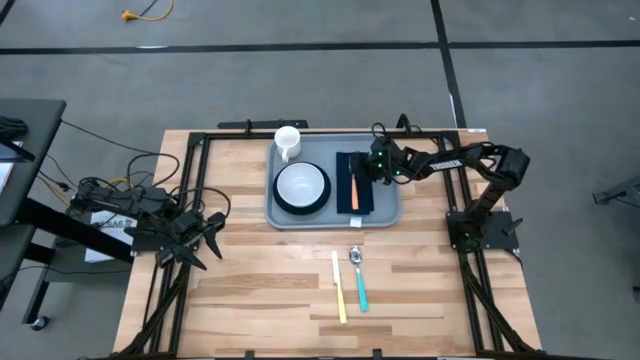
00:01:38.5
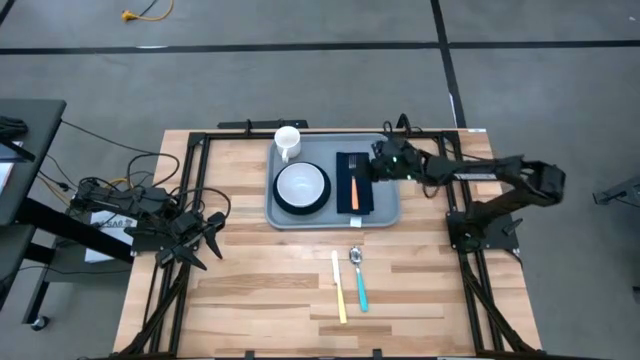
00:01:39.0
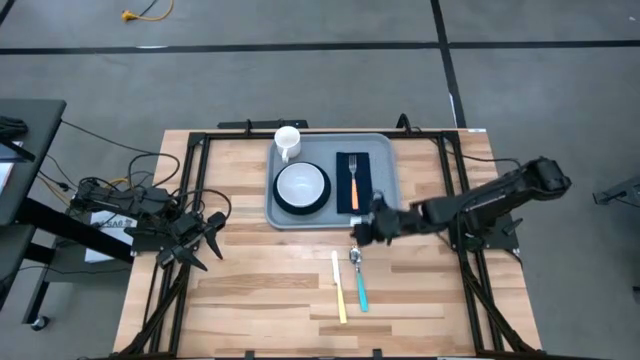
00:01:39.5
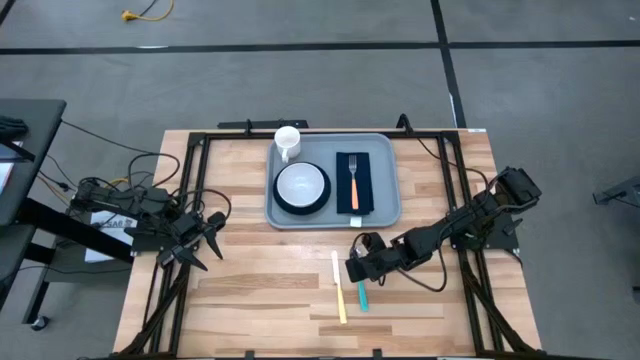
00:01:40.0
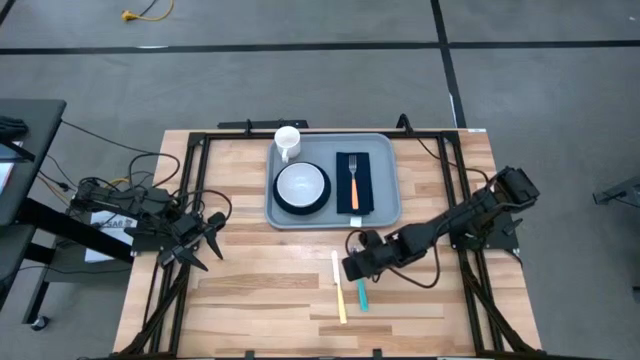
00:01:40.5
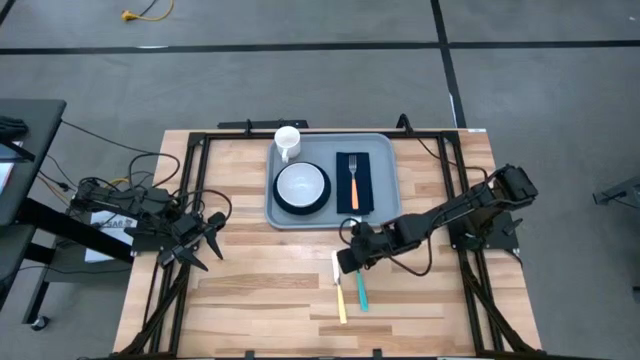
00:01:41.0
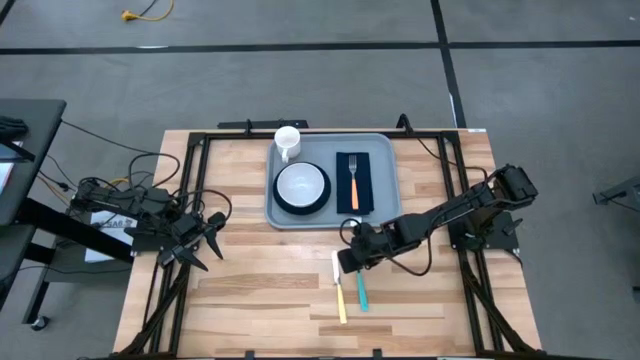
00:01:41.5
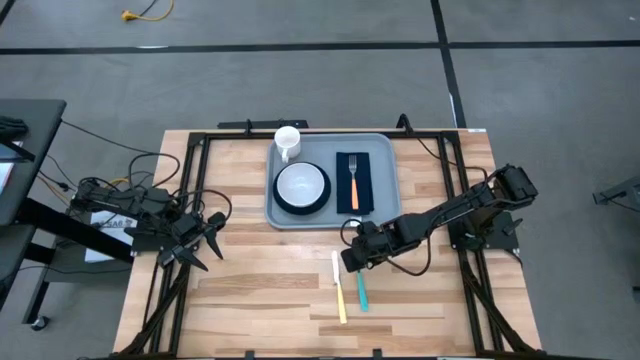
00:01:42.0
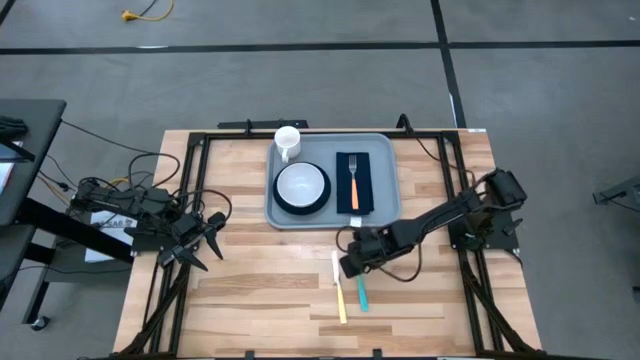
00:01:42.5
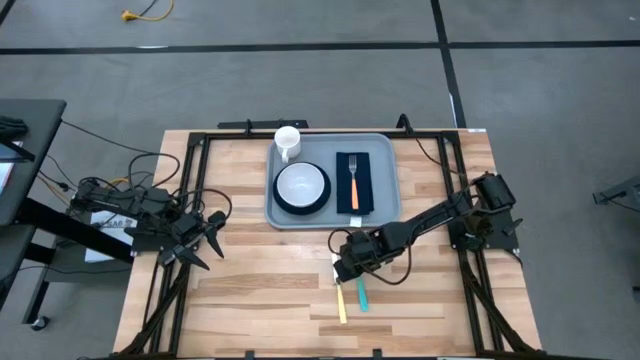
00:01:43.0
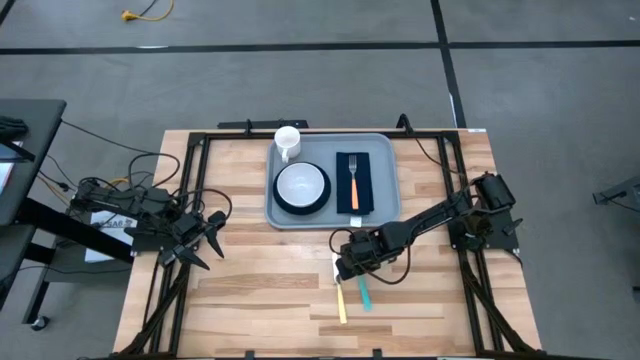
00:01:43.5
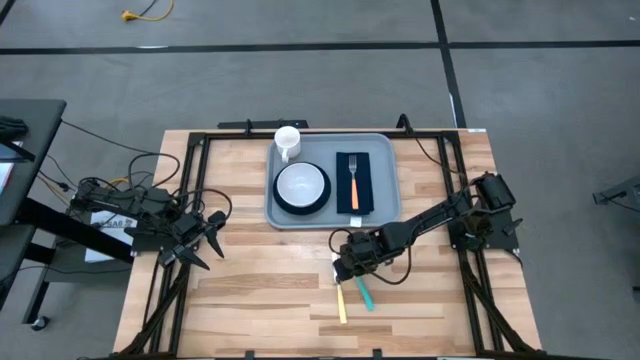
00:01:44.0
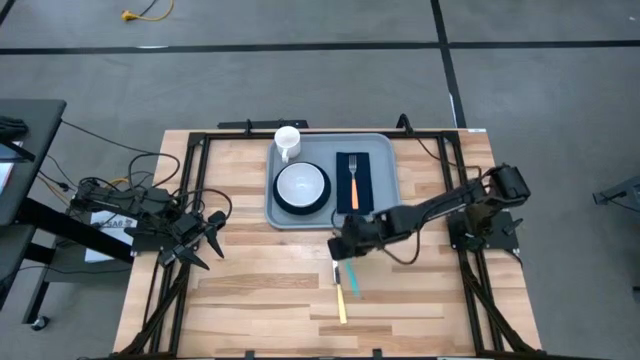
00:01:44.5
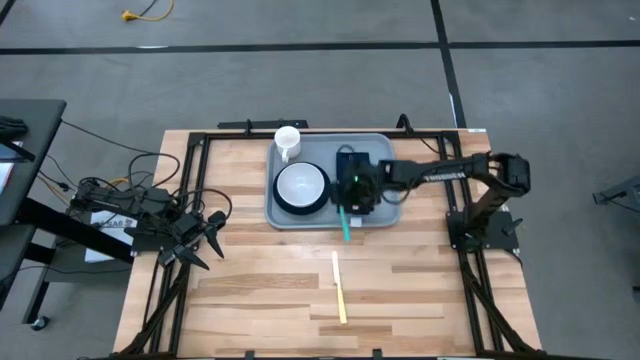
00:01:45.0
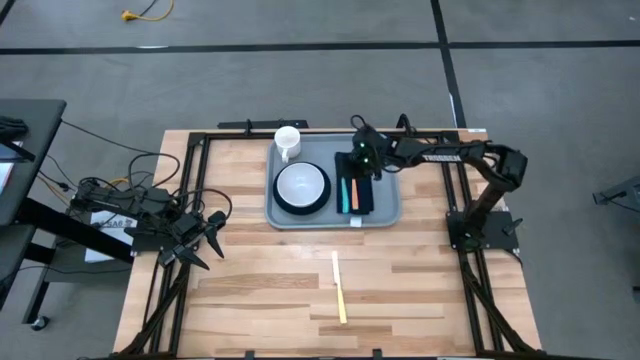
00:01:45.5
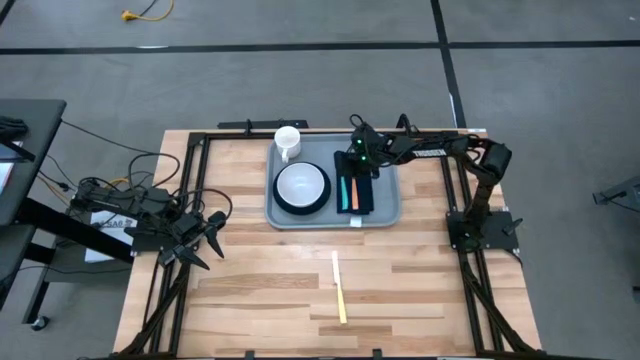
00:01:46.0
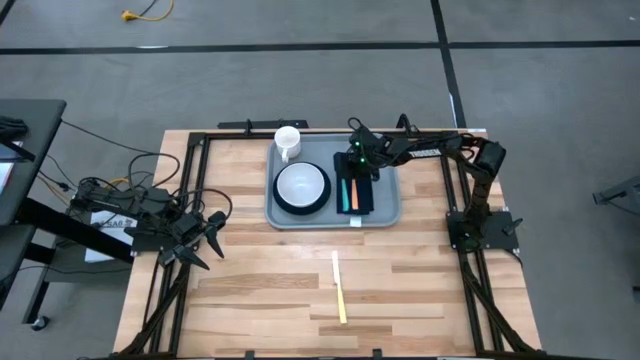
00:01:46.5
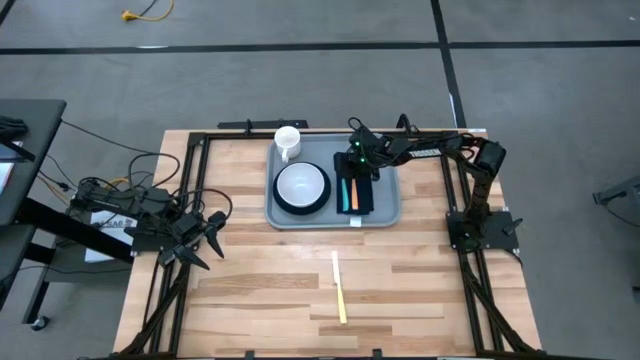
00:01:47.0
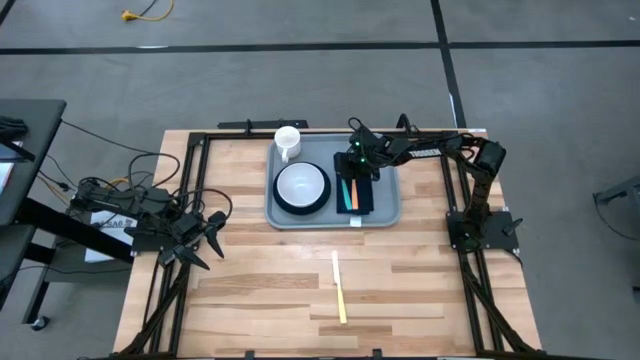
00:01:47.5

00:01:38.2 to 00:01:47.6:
Task: Set up tray
Put the blue spoon on top of the dark blue napkin to the left side of the orange fork

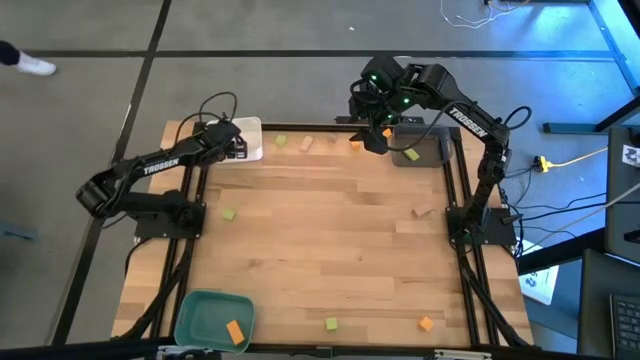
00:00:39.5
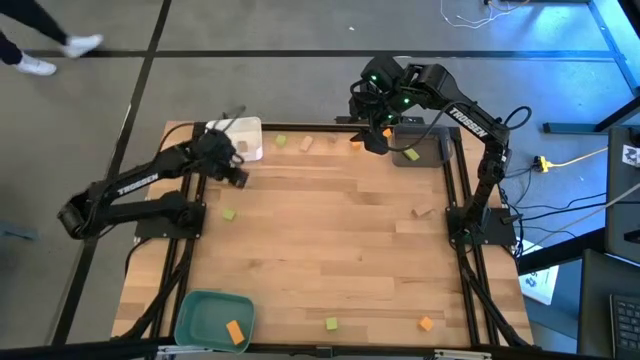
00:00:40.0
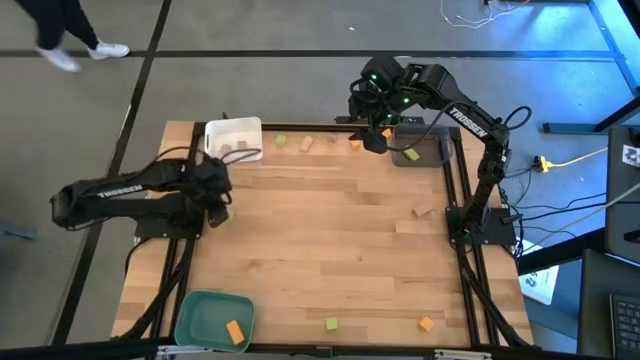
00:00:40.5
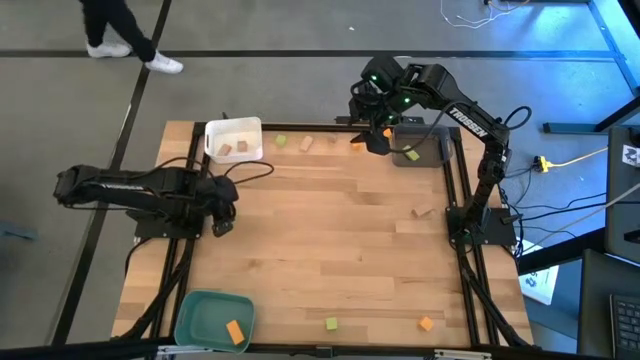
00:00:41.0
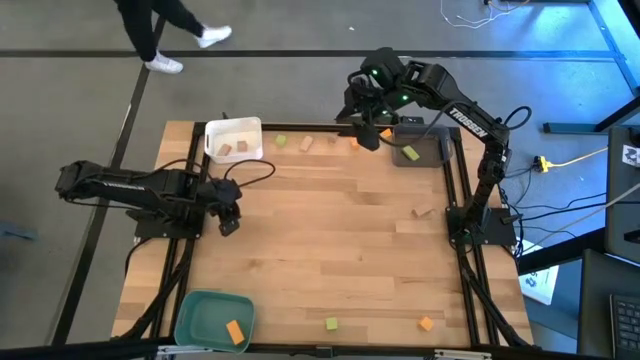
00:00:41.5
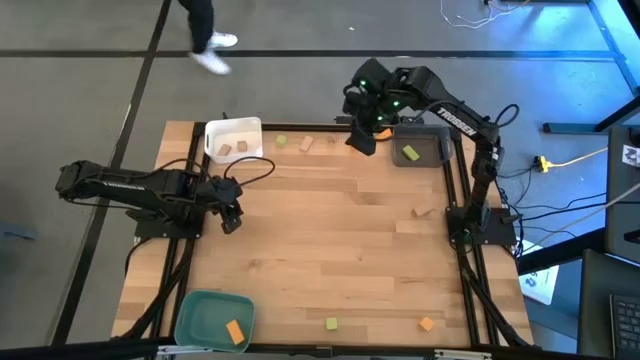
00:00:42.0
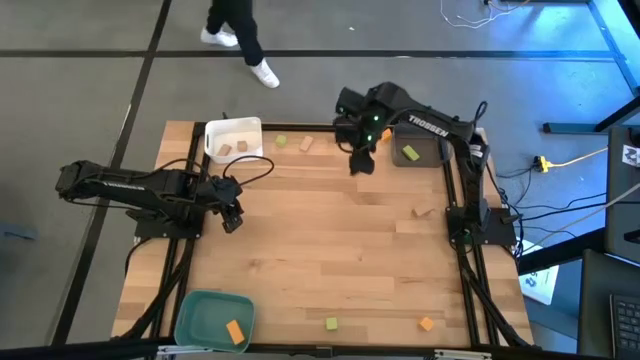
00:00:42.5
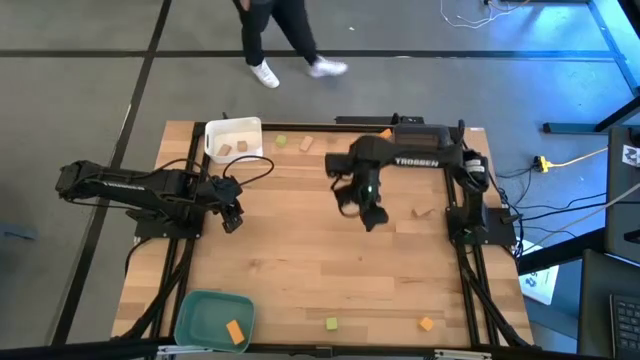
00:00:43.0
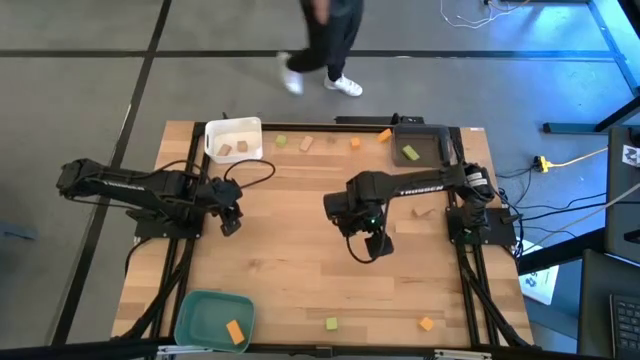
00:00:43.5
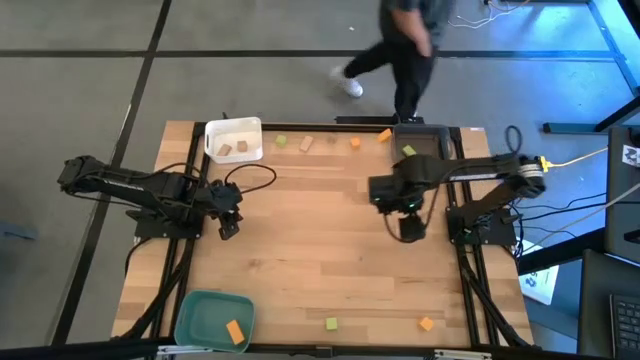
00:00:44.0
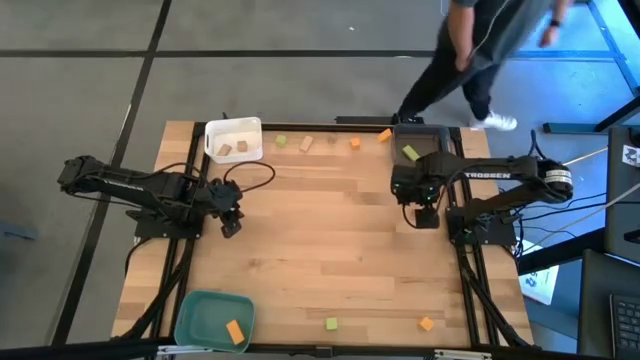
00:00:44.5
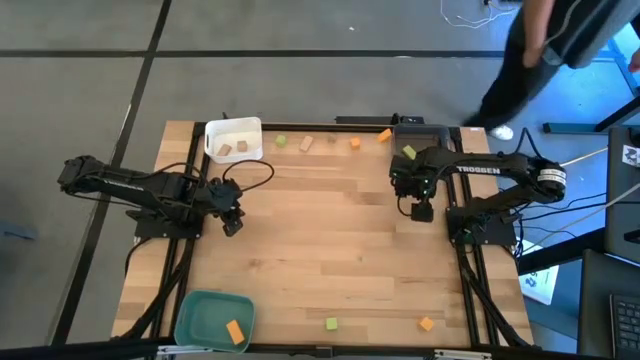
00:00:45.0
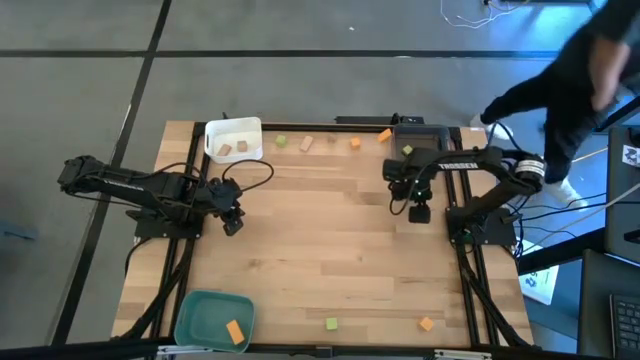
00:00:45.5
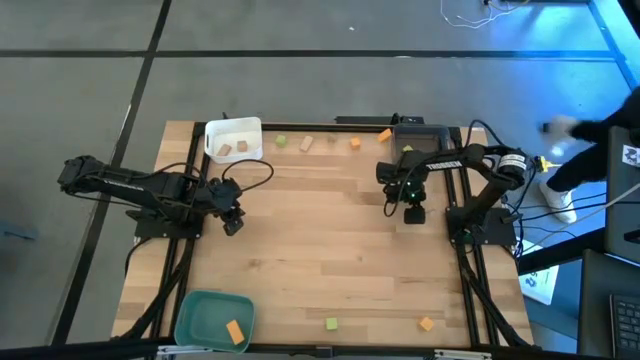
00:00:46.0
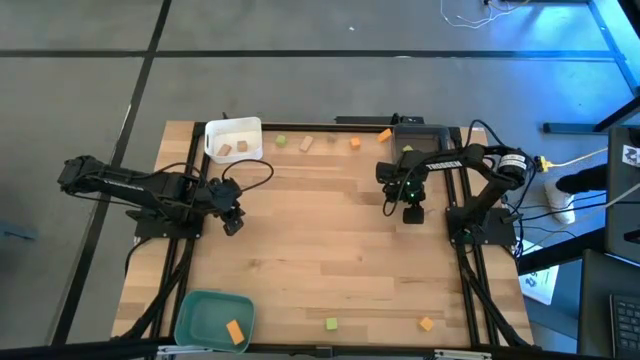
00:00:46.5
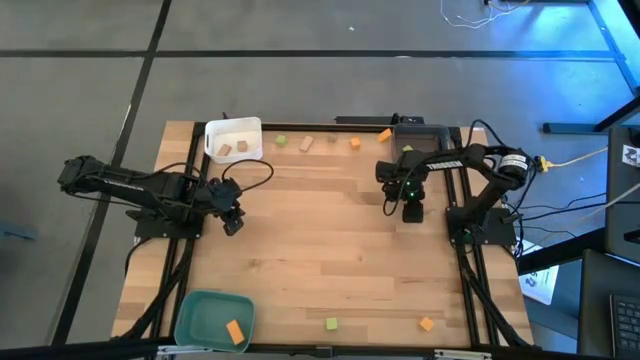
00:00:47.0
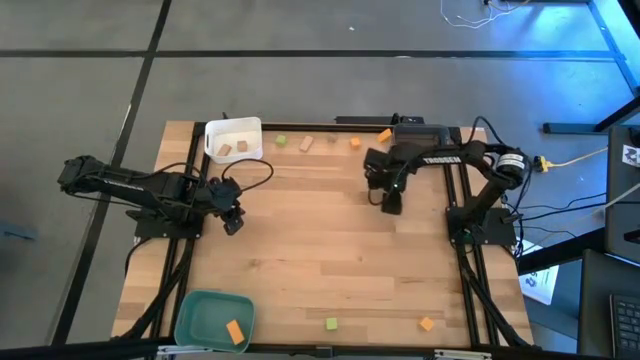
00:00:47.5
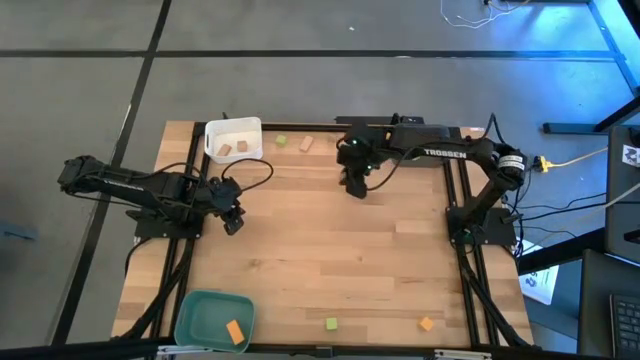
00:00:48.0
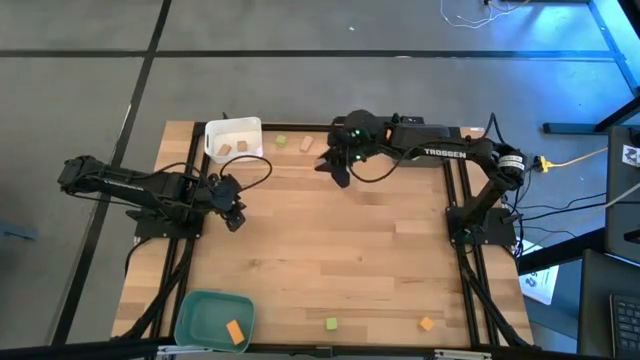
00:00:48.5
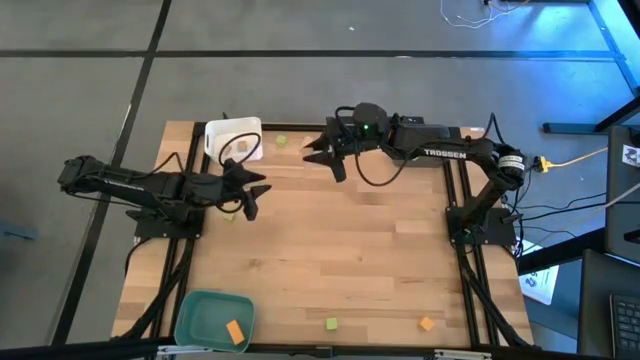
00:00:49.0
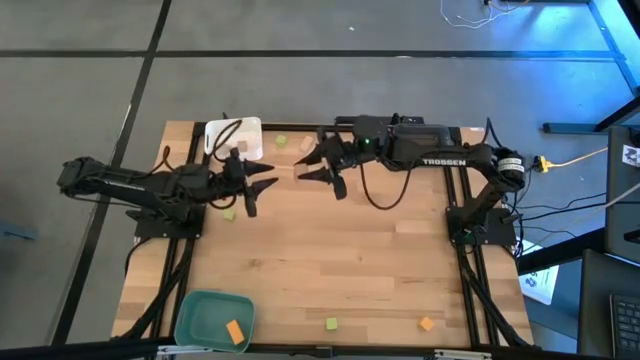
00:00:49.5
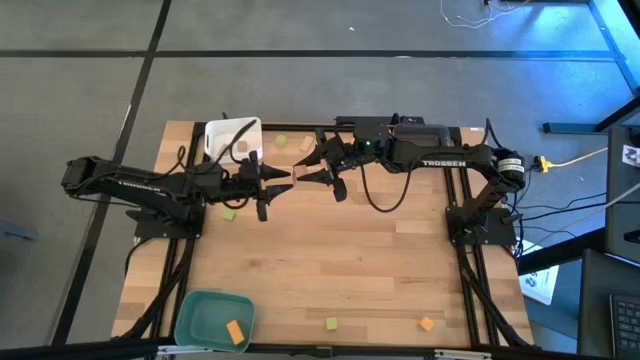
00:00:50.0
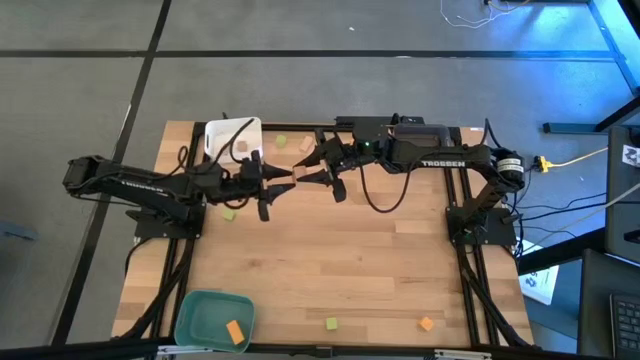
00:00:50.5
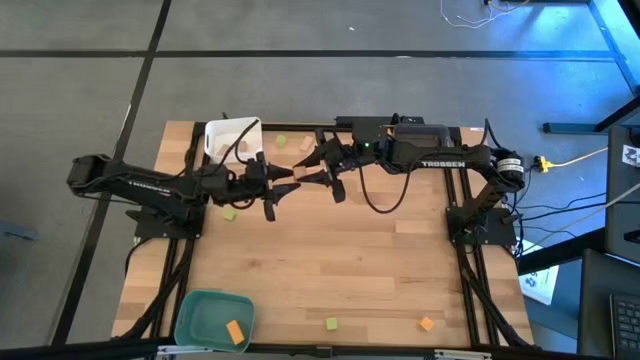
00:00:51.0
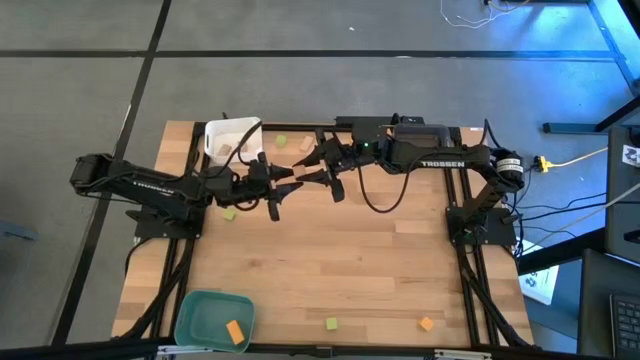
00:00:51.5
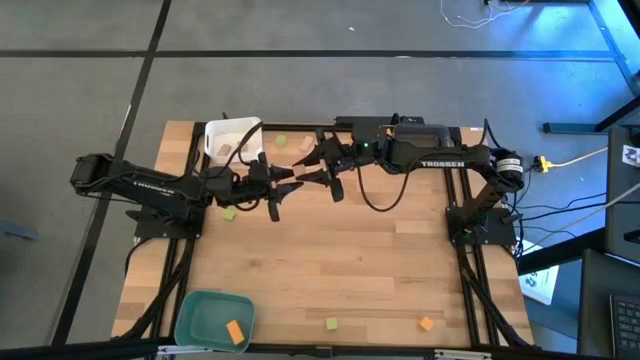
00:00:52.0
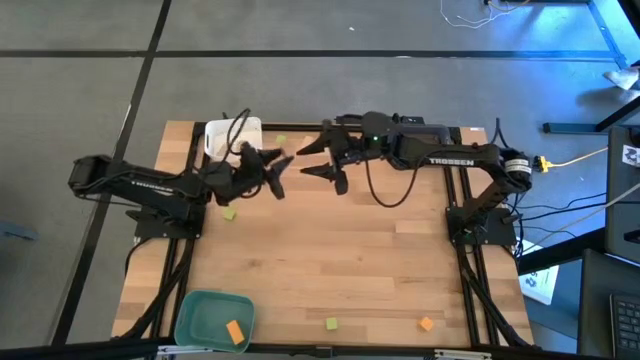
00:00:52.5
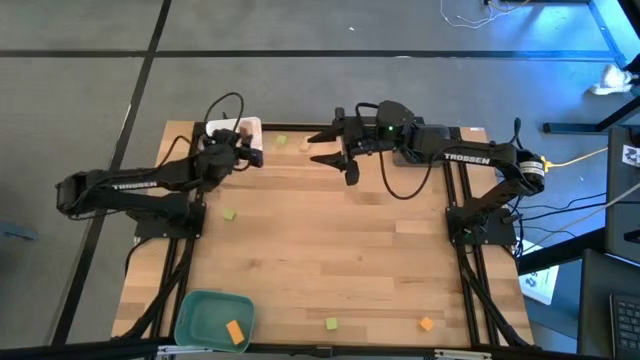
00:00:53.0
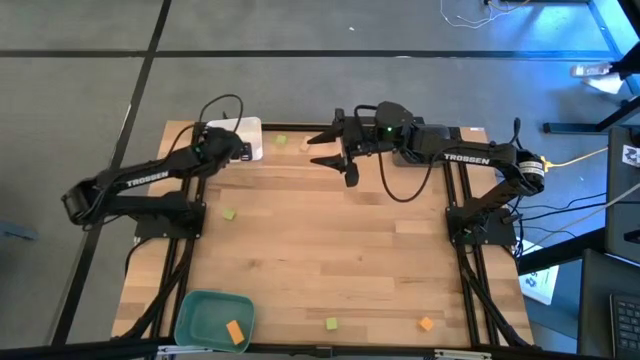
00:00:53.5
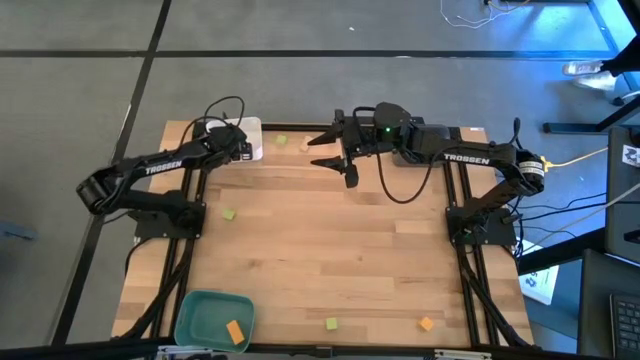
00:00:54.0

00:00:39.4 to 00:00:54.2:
Task: Sort & place blocks by color
Put the brown block into the white bin
